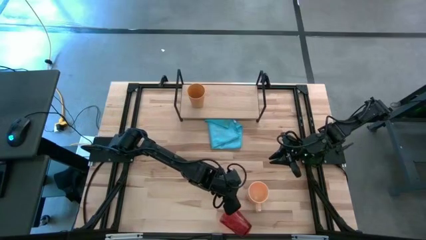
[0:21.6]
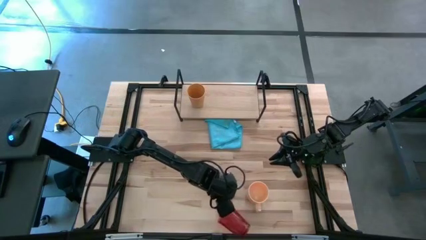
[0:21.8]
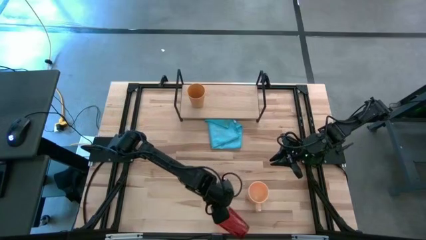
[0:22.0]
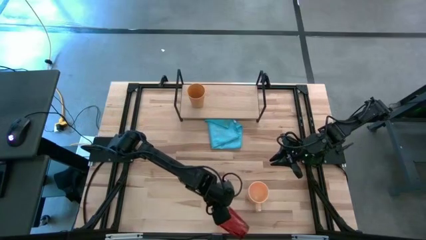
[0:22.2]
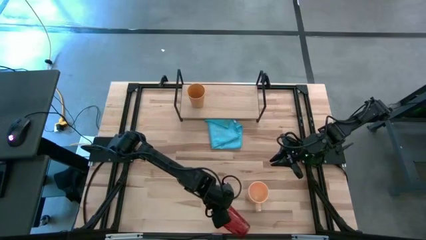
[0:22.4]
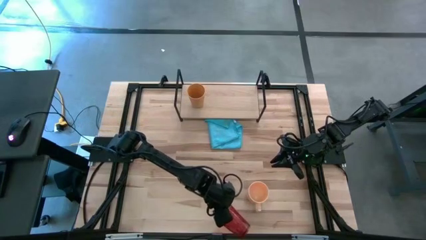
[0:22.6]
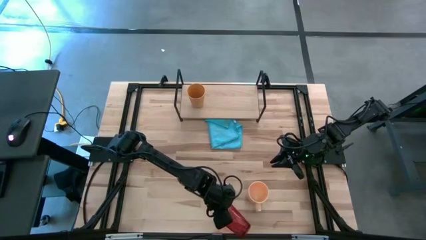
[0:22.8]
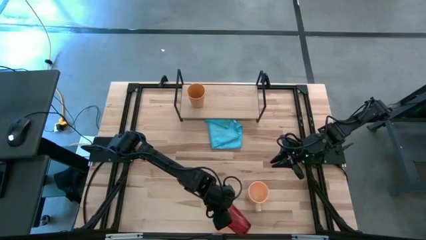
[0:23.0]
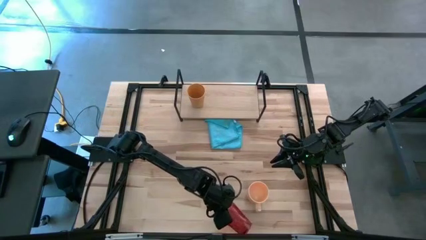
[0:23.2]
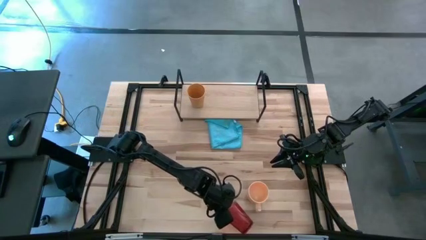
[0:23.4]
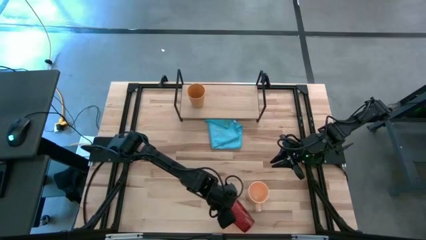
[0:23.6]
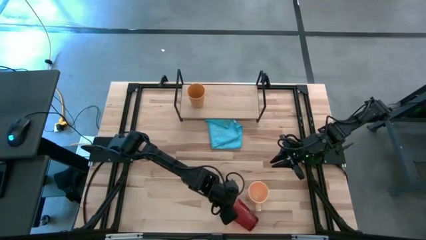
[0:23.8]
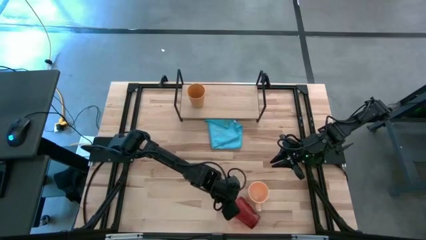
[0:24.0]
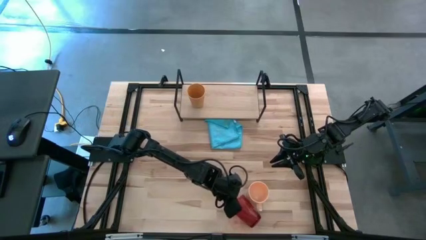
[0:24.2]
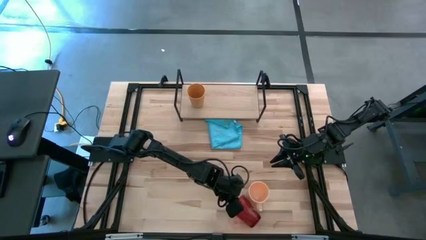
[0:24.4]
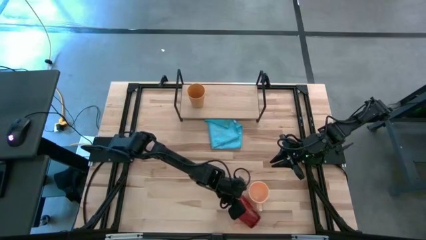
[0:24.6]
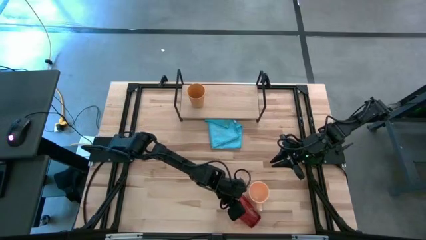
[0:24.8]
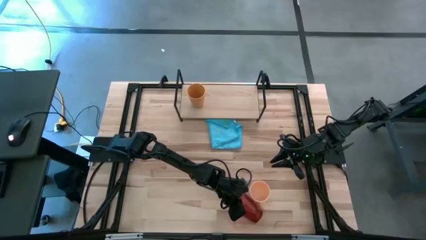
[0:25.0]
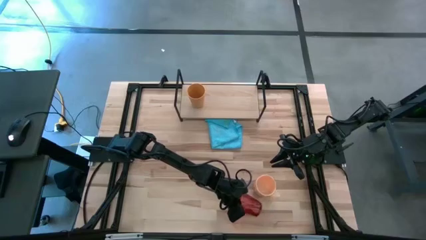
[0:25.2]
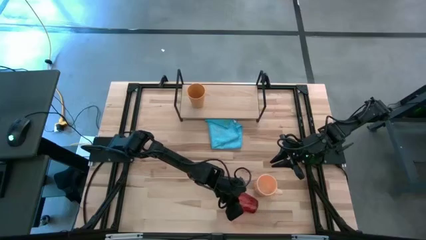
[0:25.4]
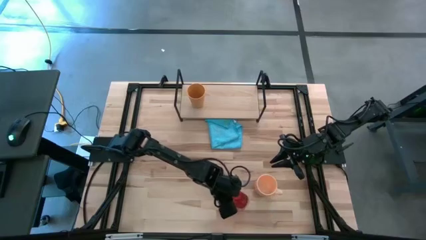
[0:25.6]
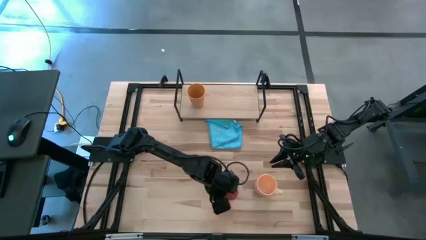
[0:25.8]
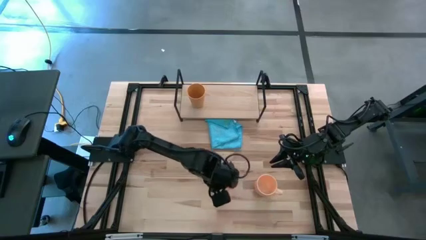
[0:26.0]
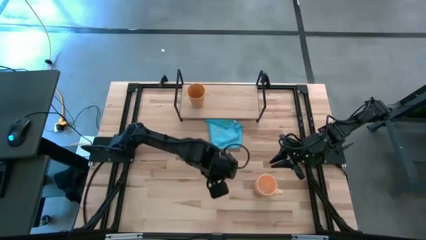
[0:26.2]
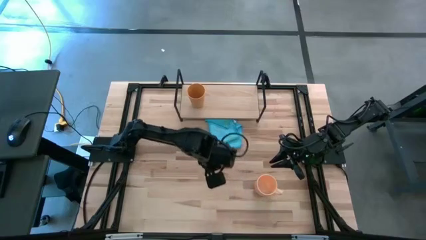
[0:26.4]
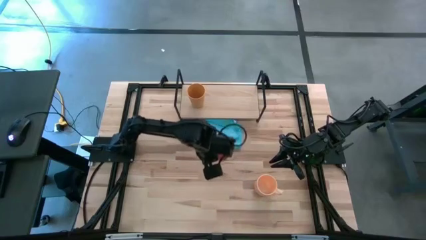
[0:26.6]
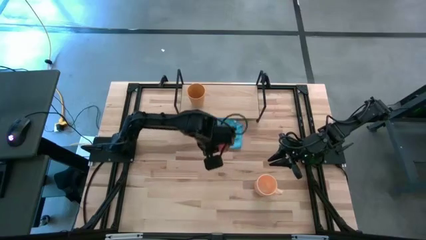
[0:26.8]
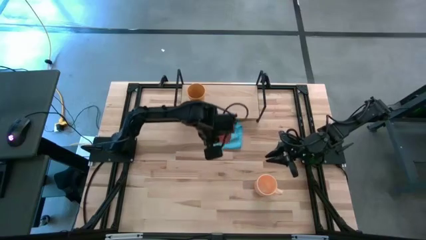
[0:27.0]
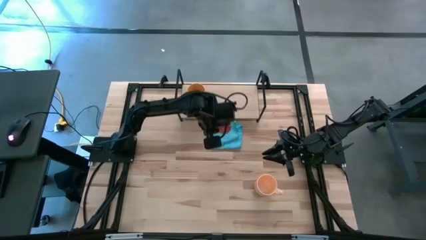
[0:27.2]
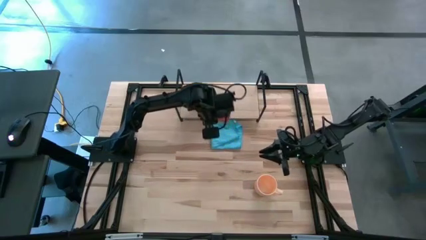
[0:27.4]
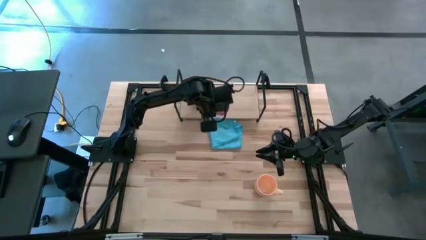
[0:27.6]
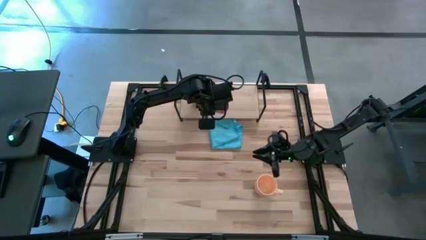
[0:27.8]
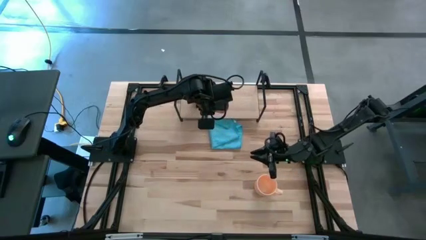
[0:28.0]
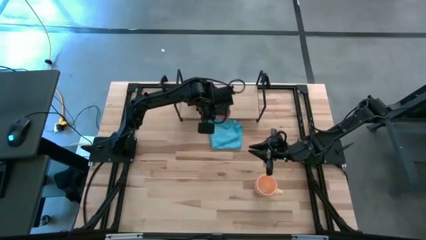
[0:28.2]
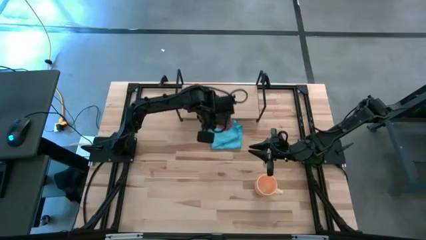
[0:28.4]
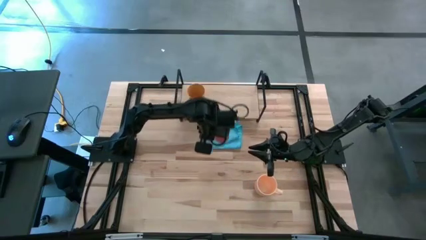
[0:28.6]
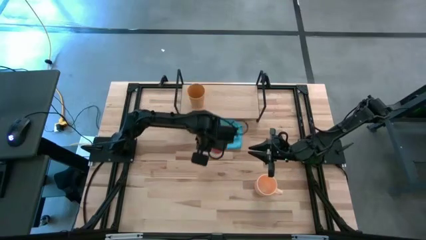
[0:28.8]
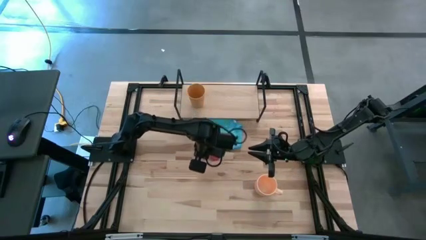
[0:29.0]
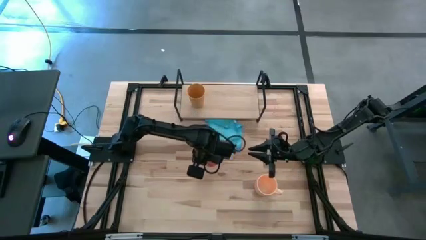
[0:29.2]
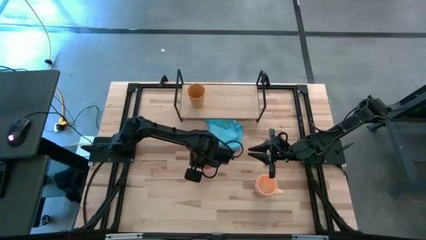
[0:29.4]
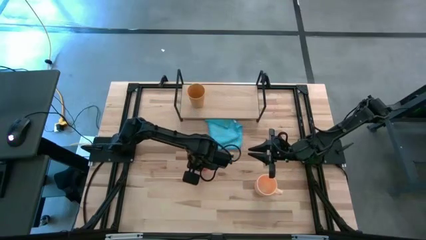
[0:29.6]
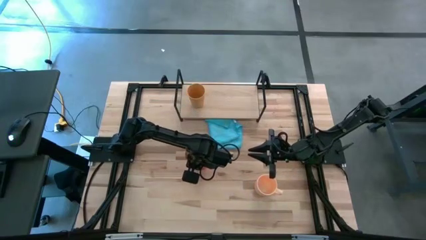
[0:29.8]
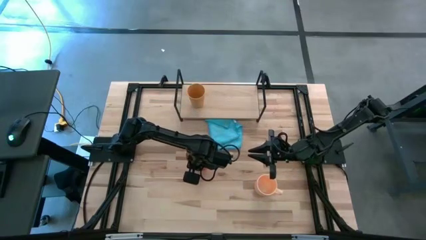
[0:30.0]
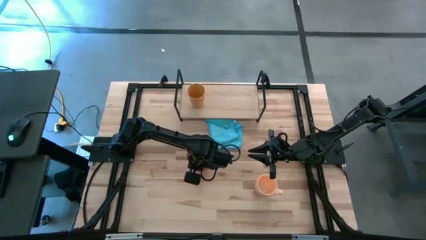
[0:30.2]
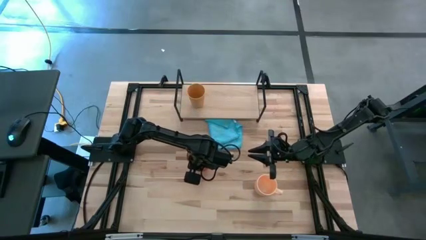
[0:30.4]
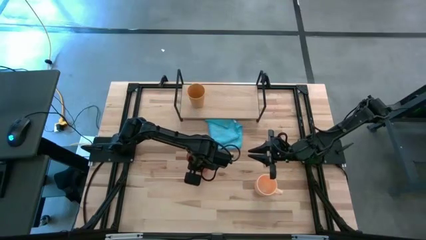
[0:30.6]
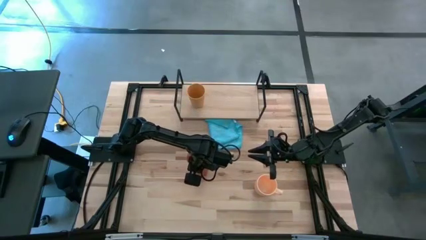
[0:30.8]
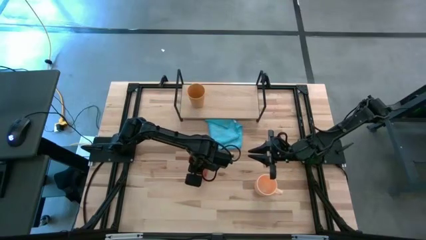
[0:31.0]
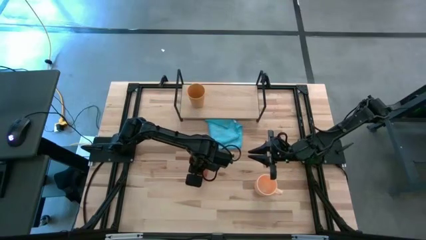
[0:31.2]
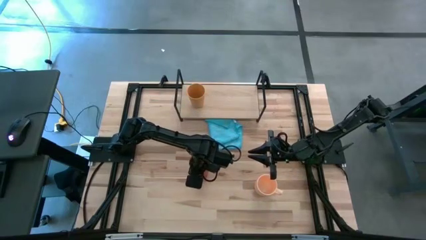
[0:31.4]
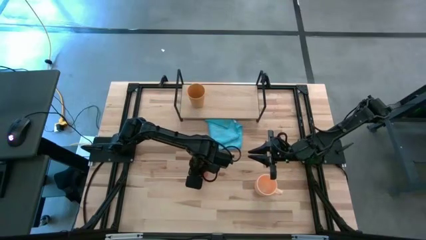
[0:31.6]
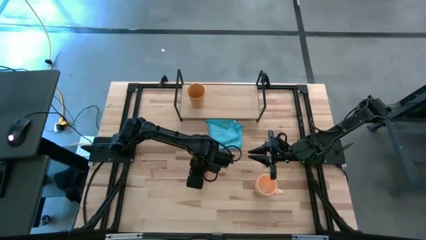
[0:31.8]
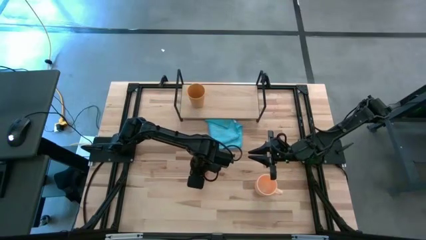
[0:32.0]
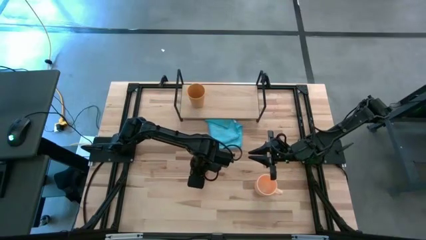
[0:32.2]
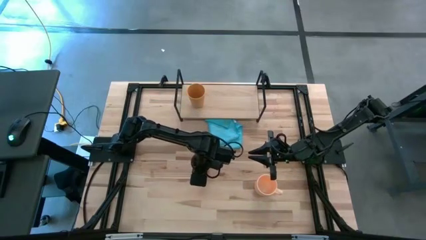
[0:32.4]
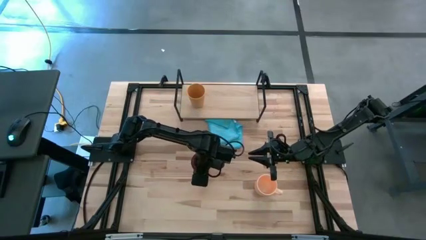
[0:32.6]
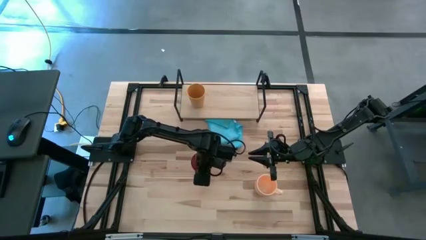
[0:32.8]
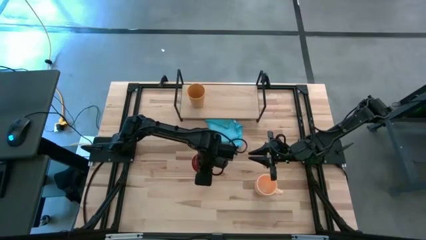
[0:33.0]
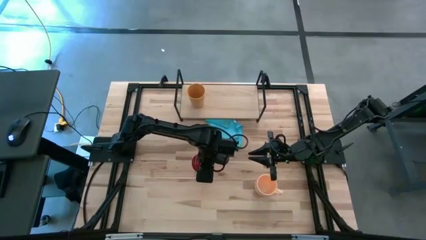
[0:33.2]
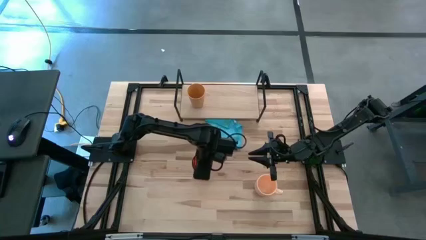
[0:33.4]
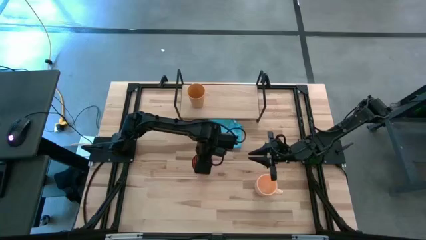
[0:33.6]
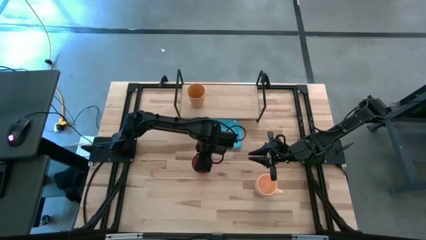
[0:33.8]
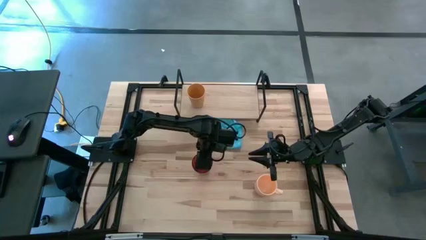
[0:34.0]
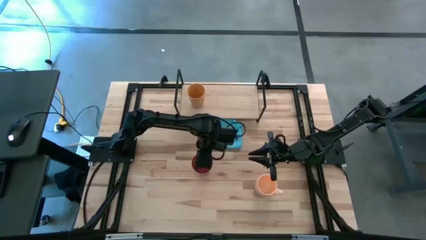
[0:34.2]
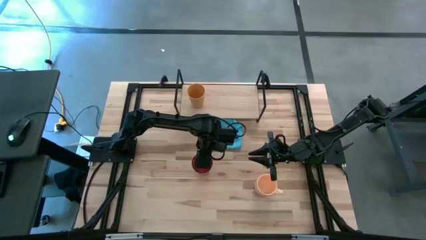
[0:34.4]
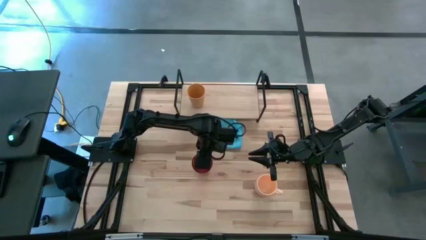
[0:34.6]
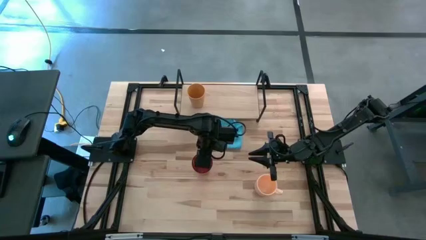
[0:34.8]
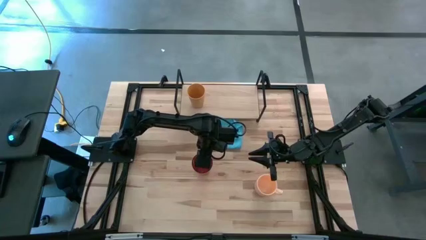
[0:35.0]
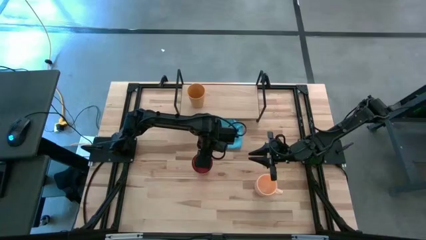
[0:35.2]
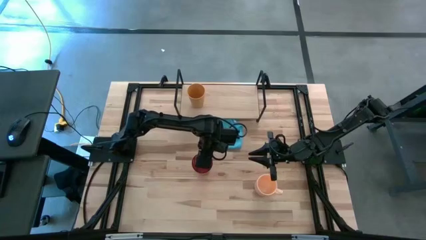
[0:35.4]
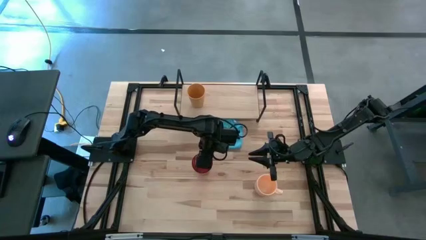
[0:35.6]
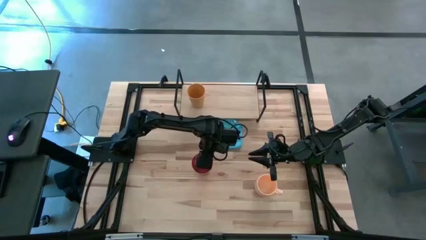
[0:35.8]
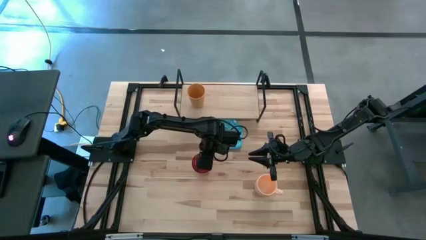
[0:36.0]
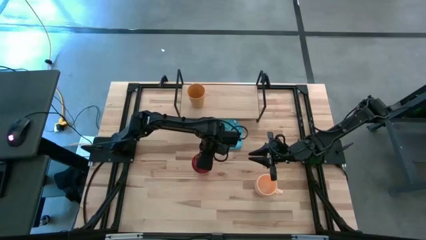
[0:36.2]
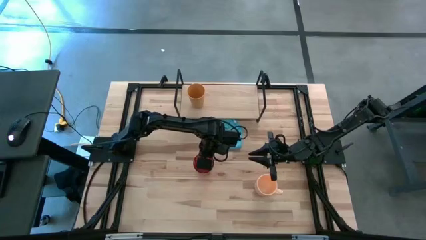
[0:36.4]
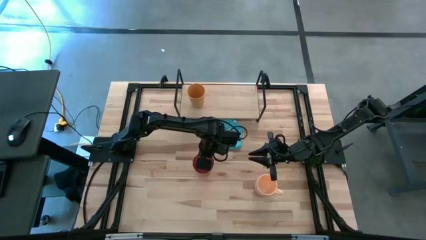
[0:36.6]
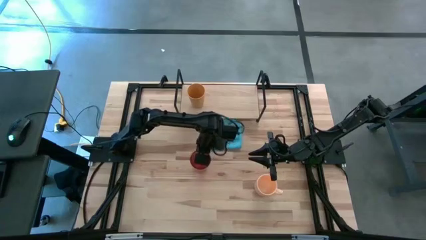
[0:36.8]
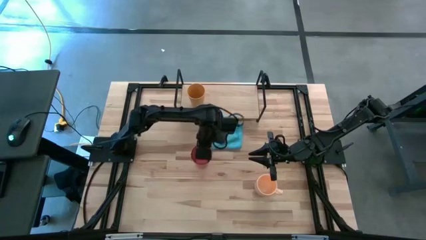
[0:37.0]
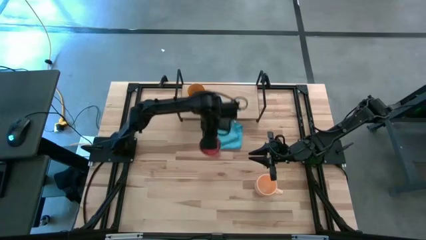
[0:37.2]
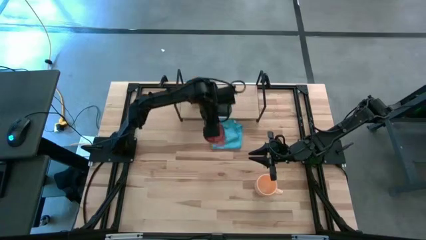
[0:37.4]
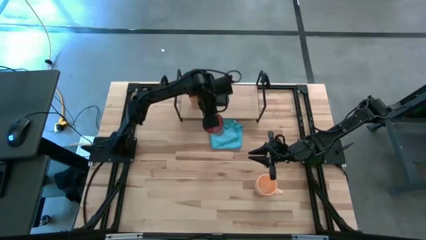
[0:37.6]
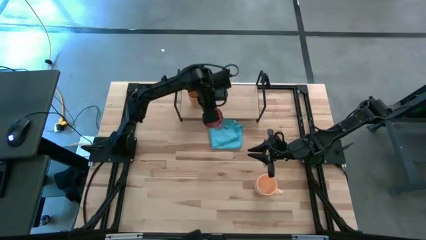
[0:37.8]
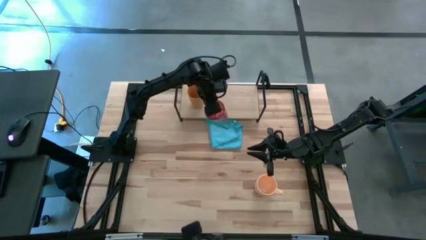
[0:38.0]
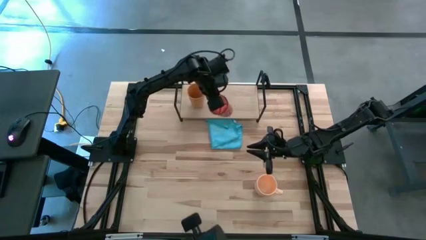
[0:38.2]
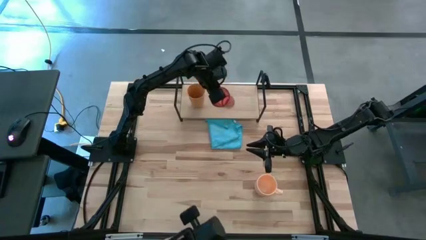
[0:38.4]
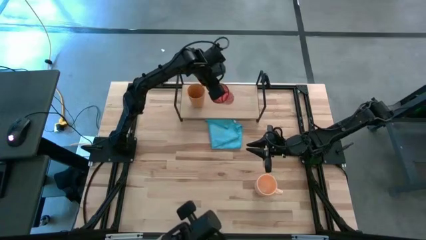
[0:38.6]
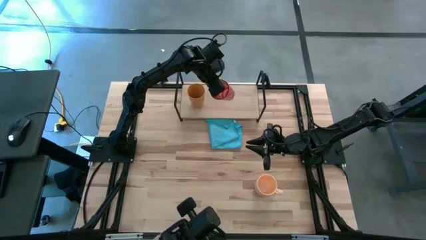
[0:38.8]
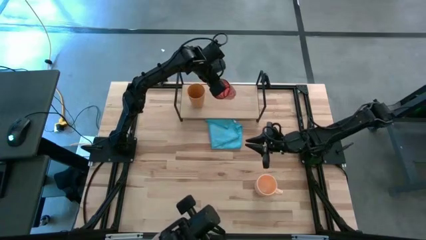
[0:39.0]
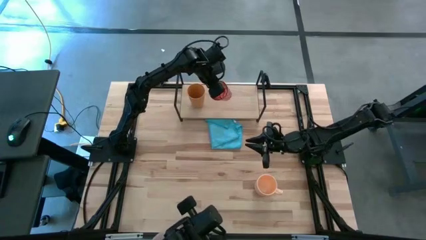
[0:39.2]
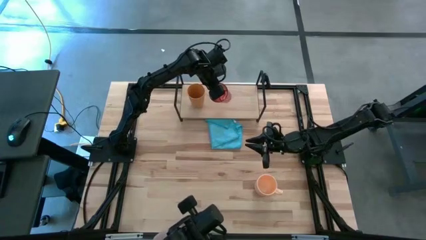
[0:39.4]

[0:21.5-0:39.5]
Task: Stack small to large cups/mugs on shelf
Put the orange cup on the shelf
